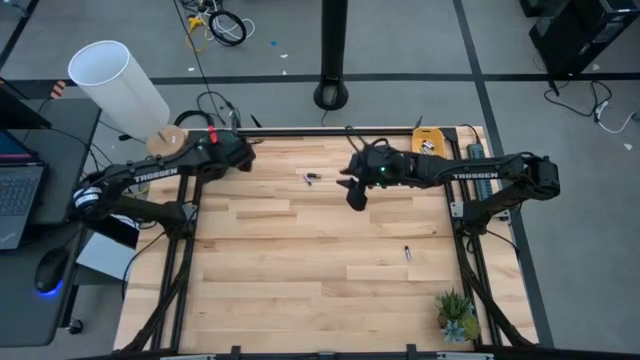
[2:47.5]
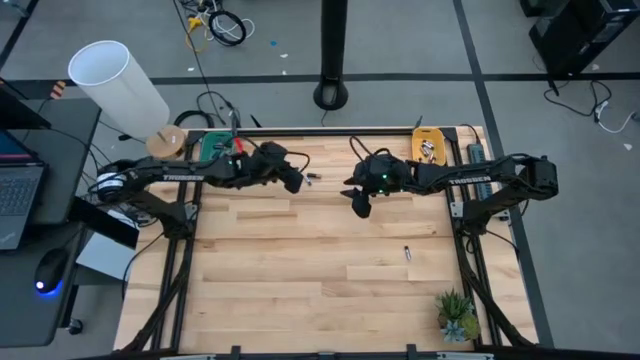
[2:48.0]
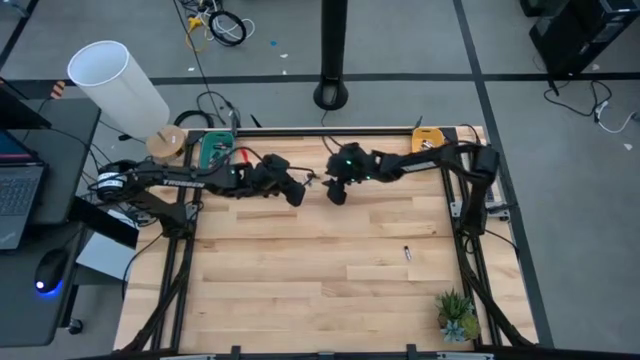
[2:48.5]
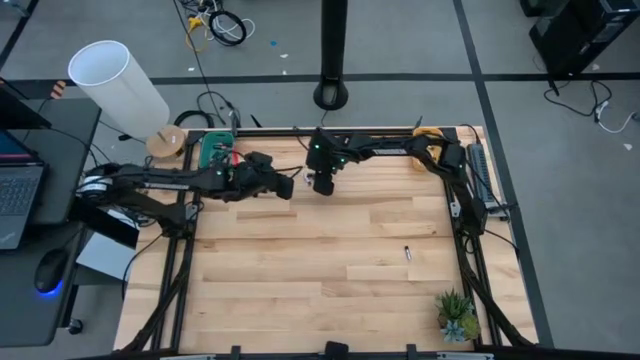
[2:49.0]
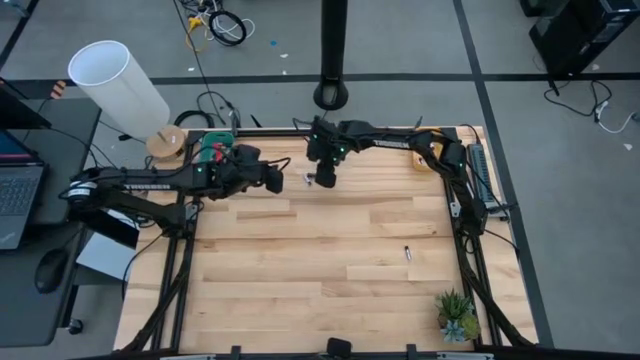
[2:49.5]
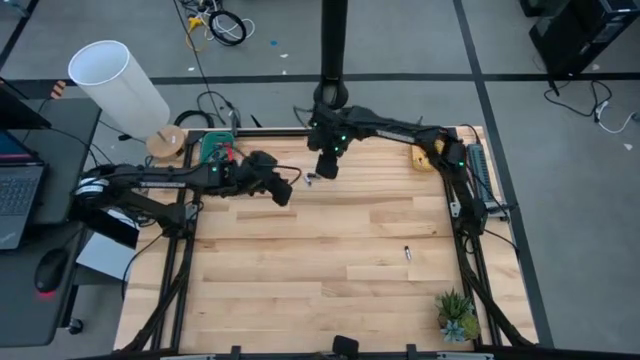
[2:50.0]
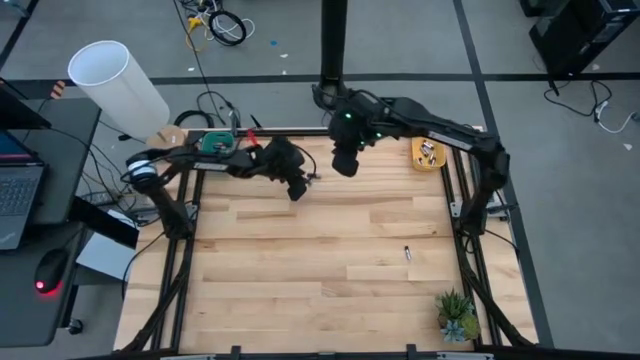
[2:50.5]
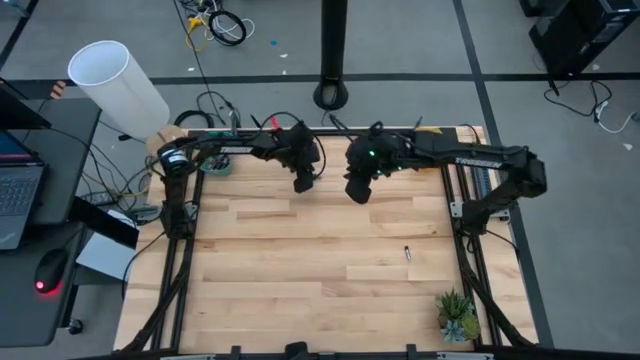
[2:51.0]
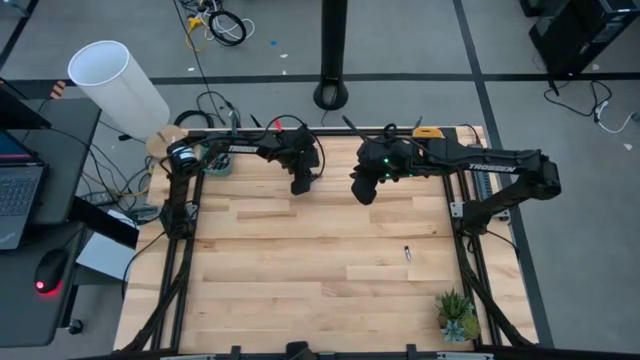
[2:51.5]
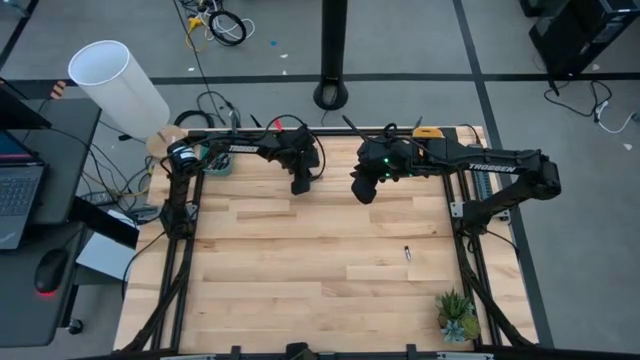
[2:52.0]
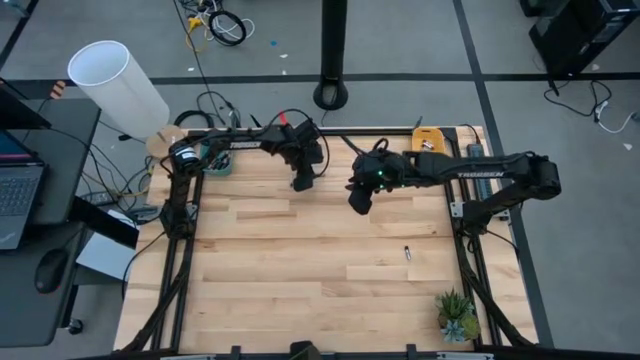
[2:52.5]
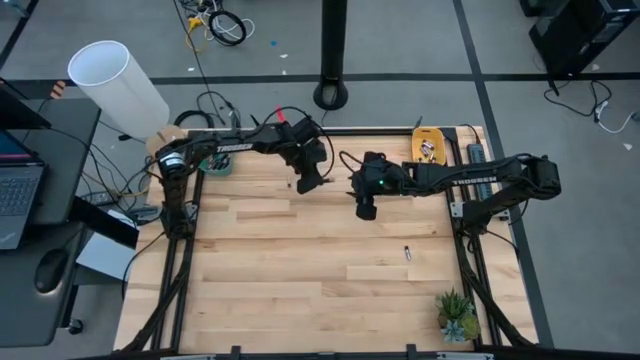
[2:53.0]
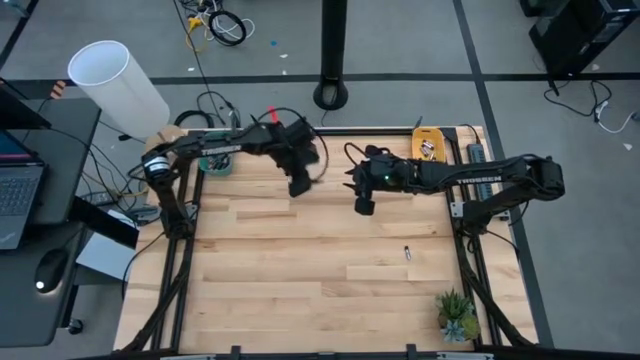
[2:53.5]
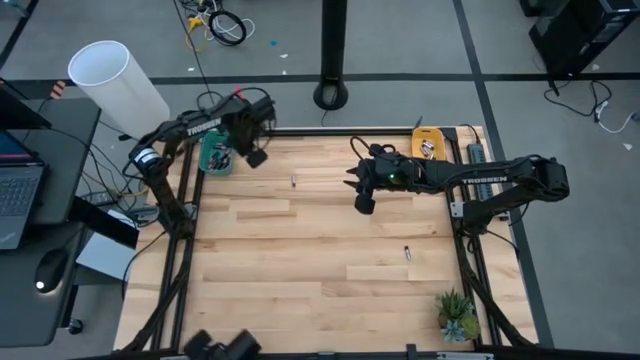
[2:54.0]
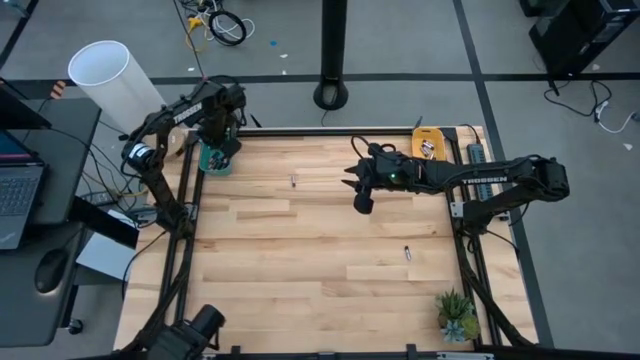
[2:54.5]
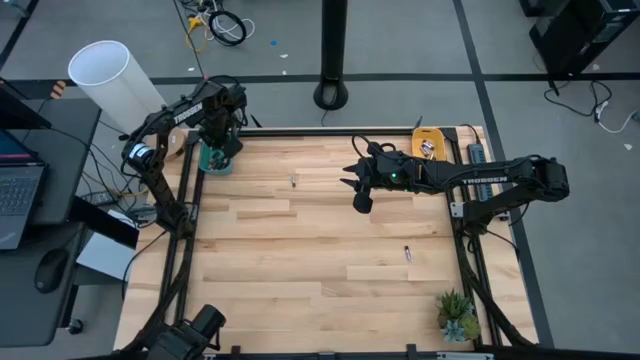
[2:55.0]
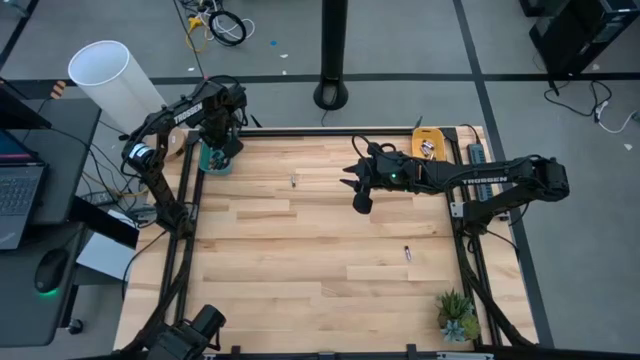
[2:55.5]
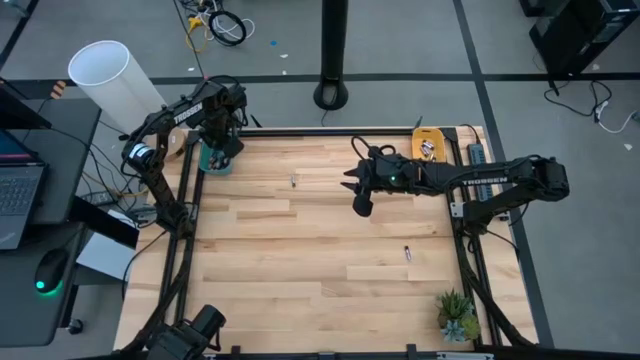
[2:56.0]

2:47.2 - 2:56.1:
Task: Sort batteries
Put the black battery into the blue bin

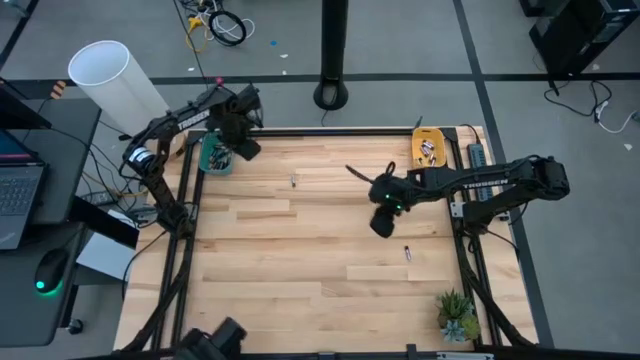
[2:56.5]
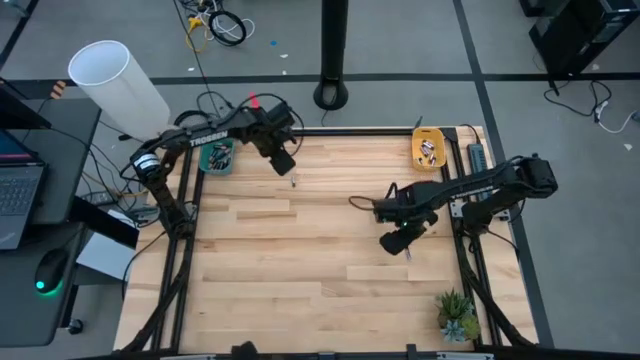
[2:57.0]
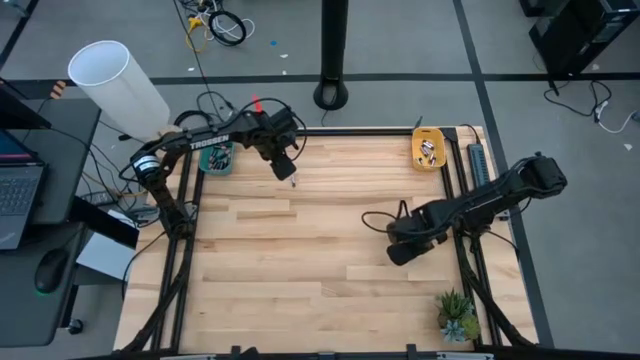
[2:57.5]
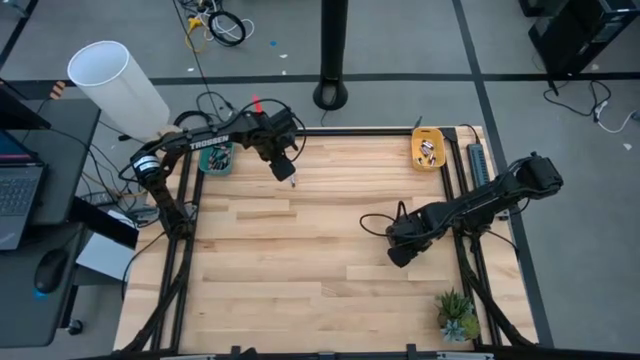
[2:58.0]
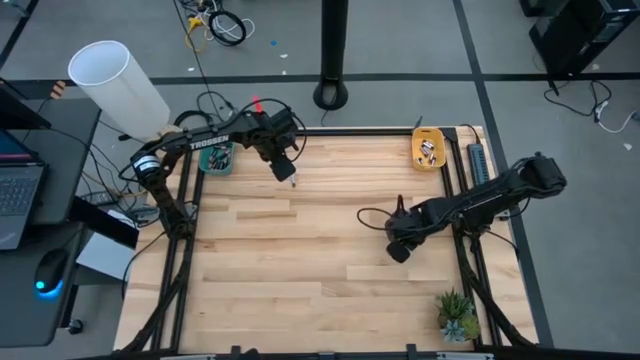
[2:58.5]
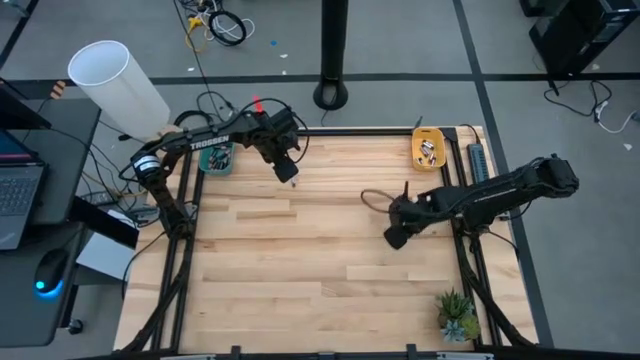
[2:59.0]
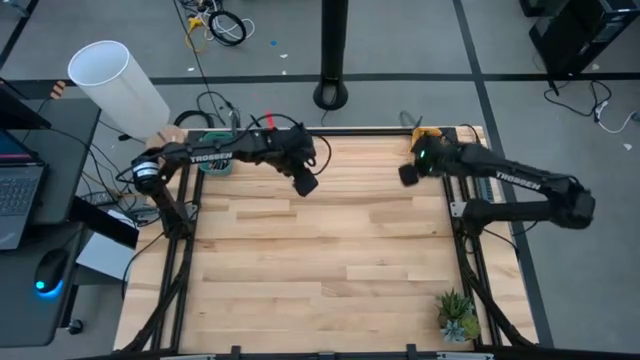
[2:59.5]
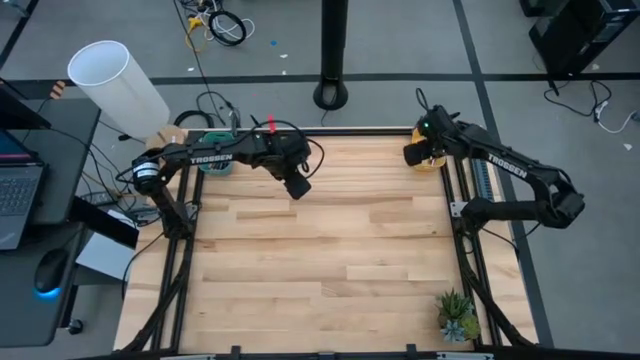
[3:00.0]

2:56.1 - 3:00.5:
Put the silver battery into the yellow bin

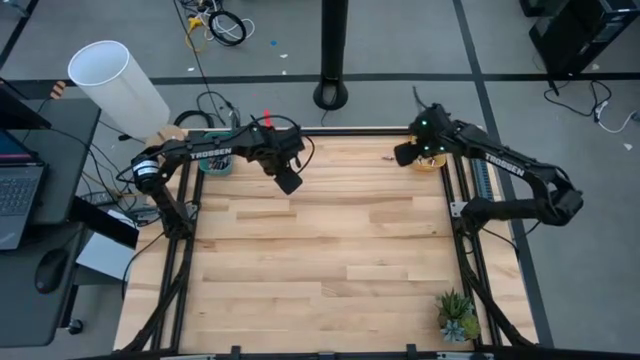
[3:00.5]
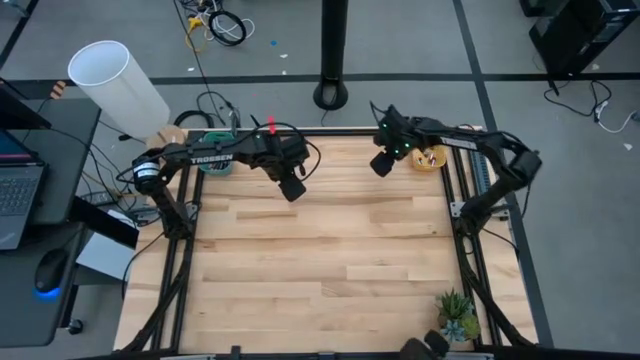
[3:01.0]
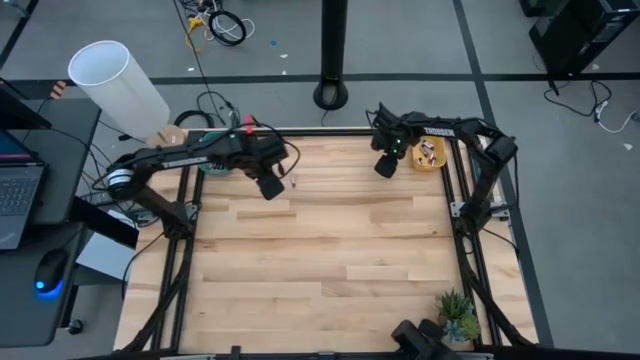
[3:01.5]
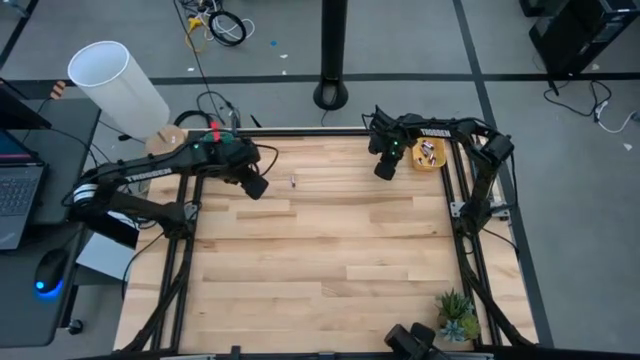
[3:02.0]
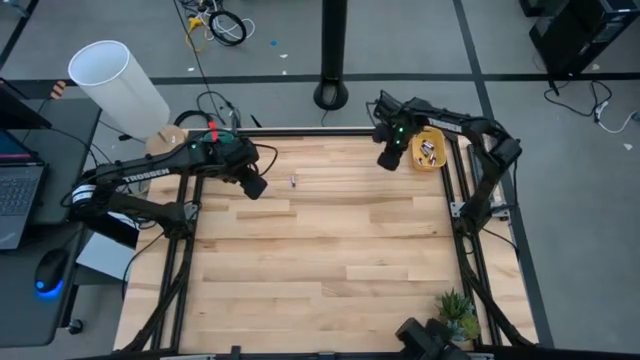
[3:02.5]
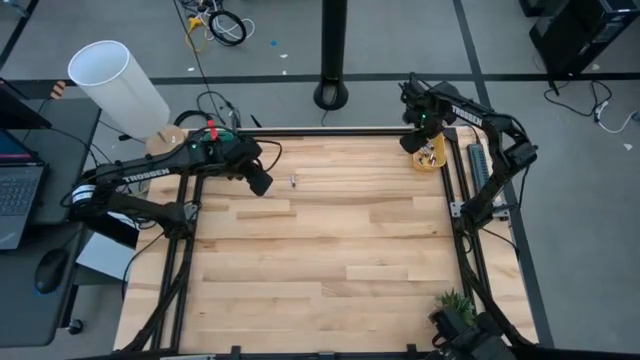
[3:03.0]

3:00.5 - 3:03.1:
Put the silver battery into the yellow bin

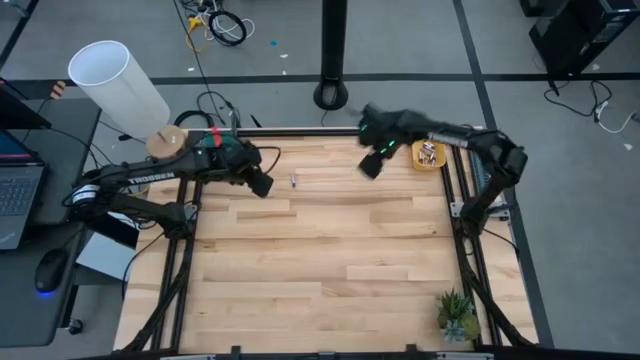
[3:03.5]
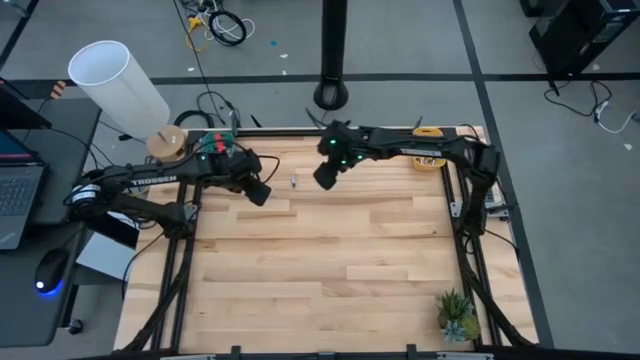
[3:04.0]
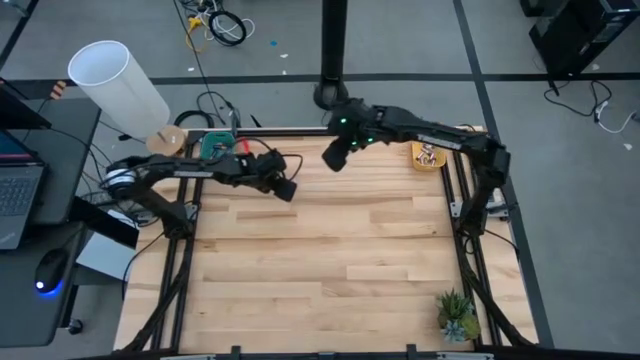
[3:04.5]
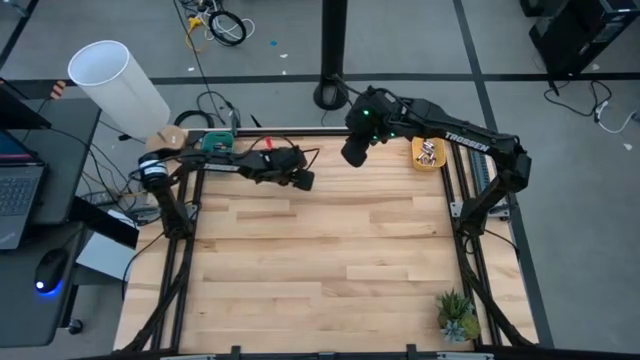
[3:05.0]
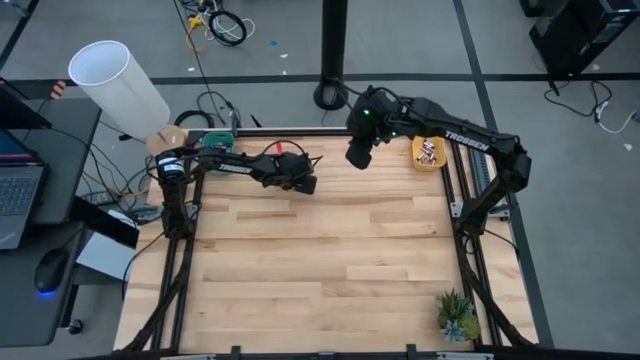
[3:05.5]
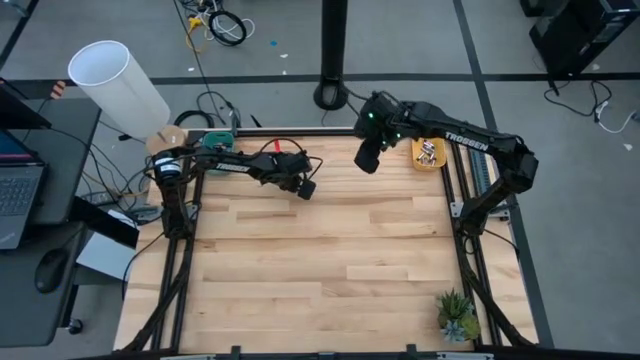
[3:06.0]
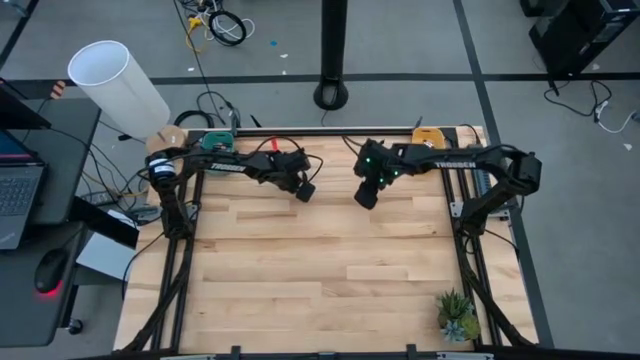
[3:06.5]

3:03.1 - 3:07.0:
Put the silver battery into the yellow bin

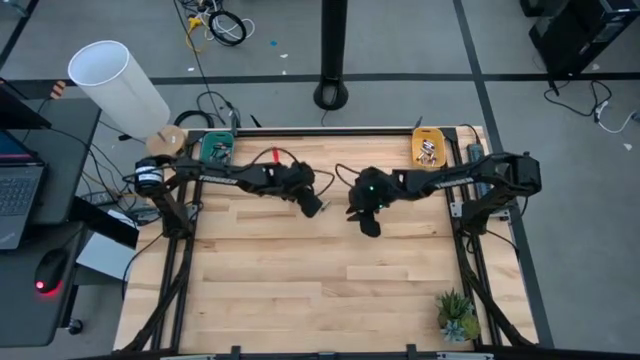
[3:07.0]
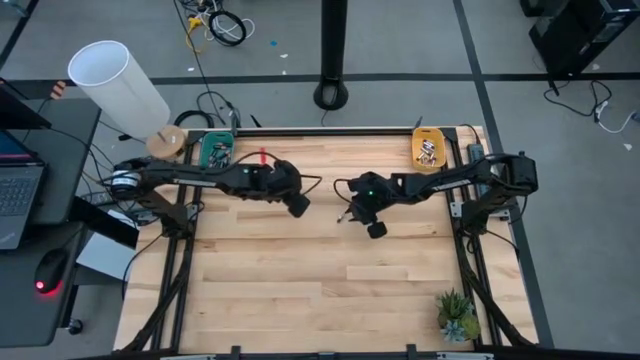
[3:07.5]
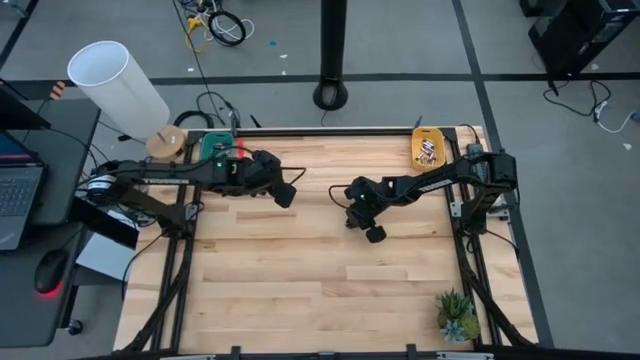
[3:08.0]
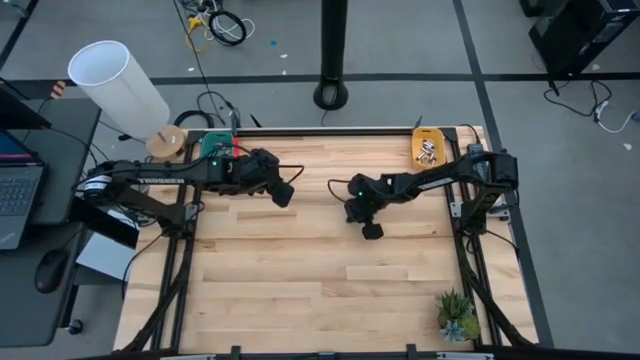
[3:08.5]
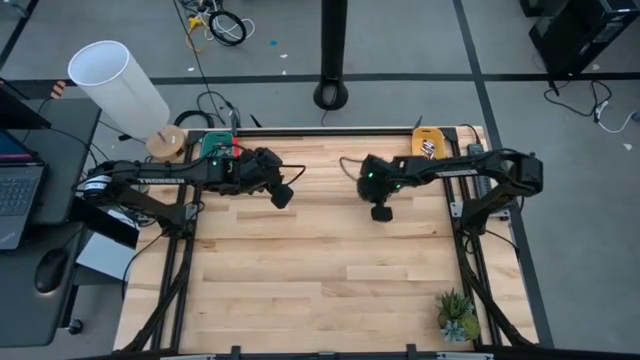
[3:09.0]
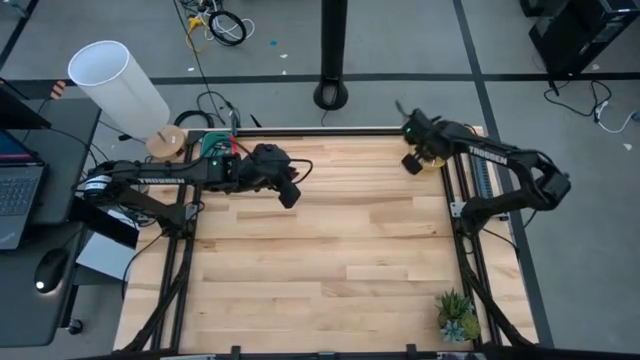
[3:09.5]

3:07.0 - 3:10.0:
Put the silver battery into the yellow bin
